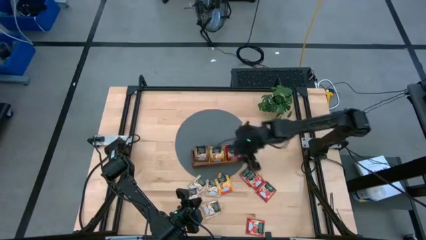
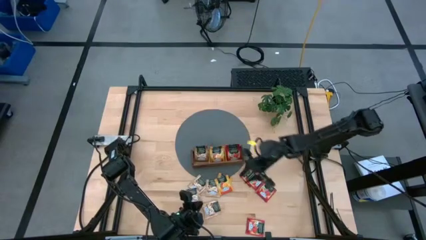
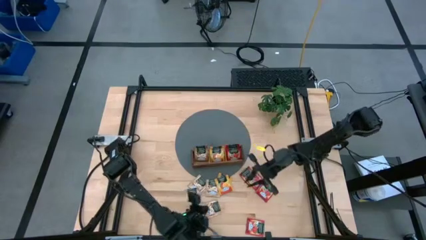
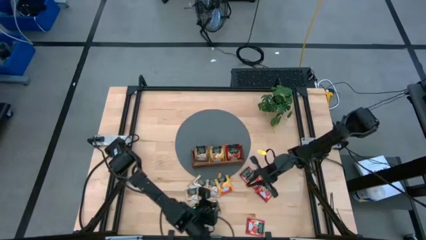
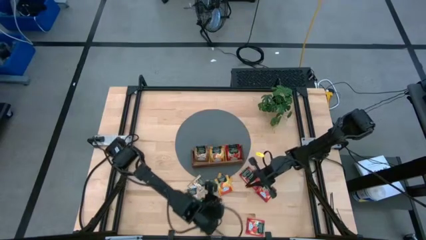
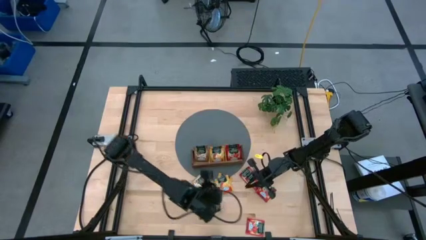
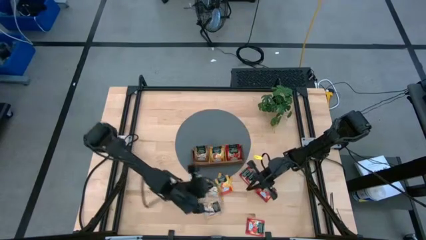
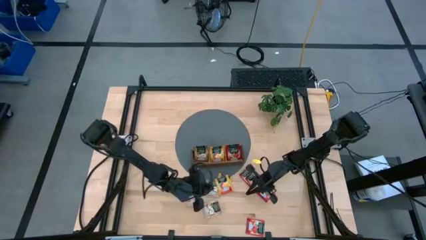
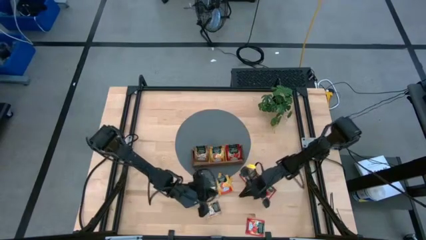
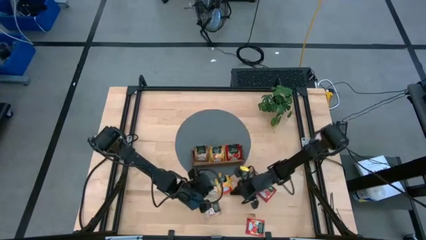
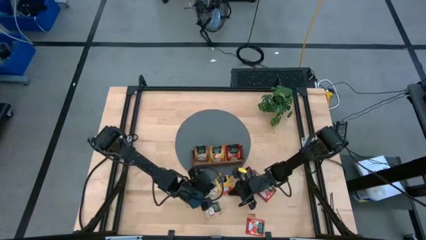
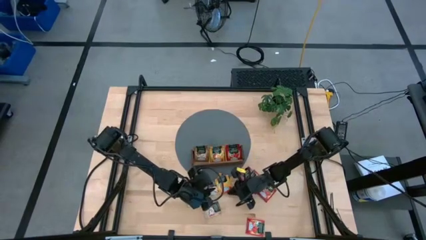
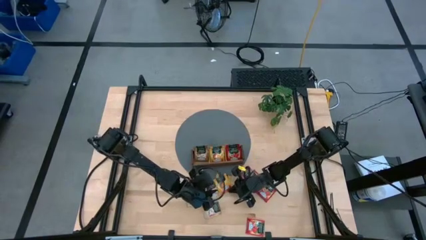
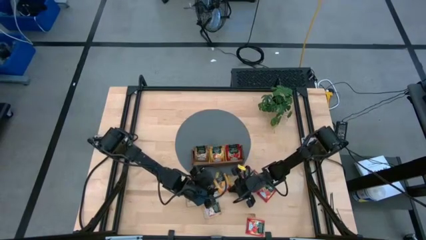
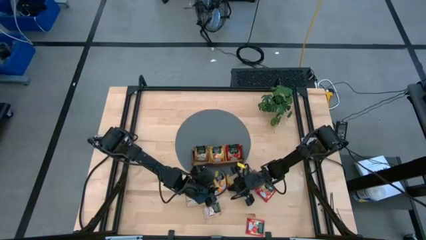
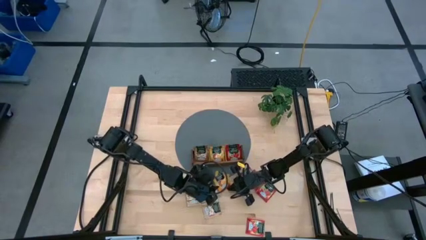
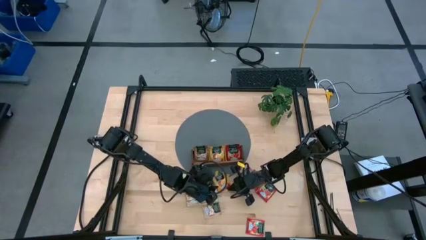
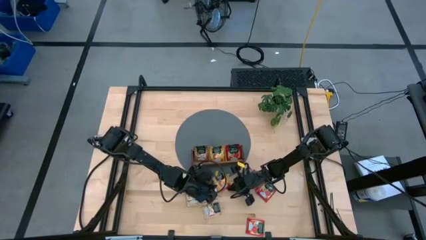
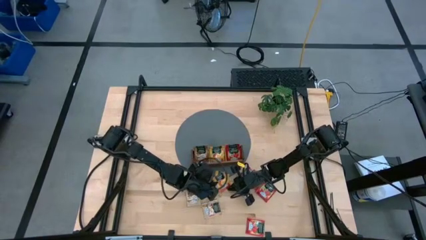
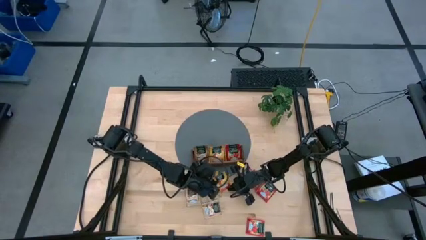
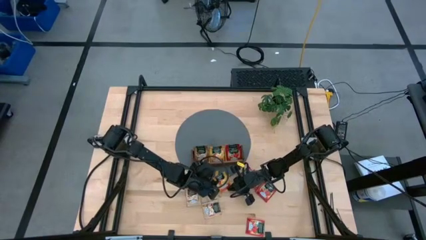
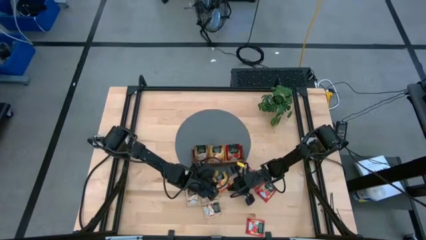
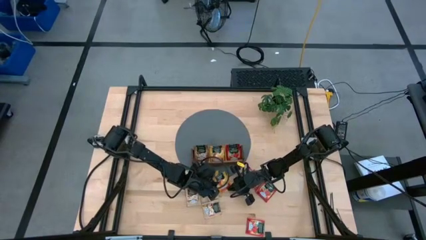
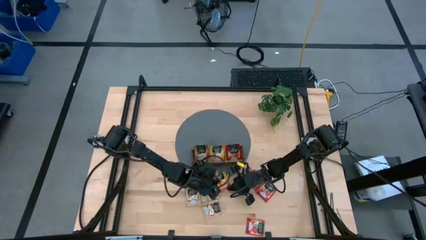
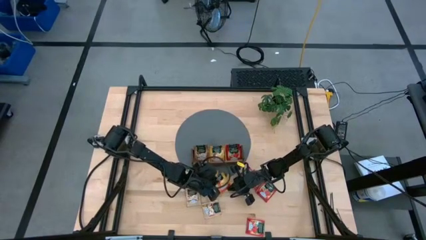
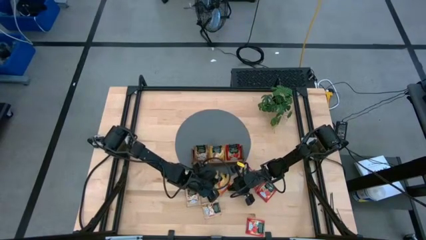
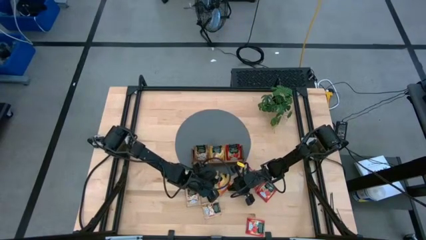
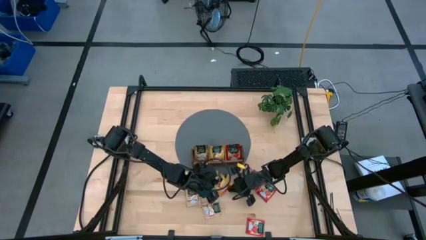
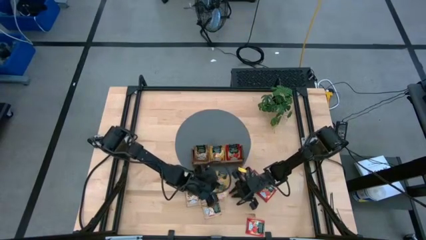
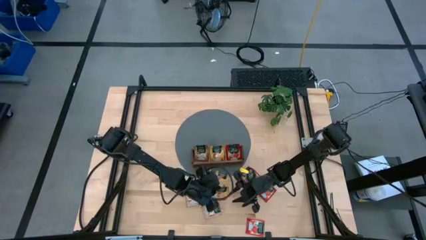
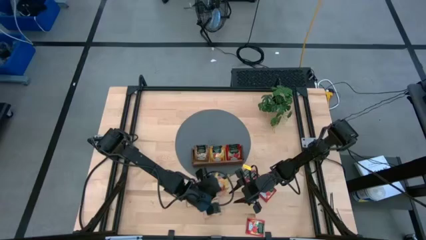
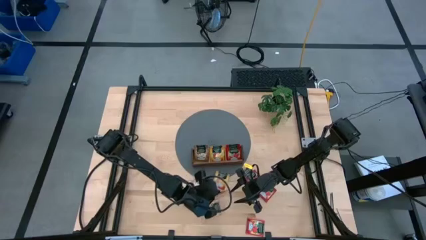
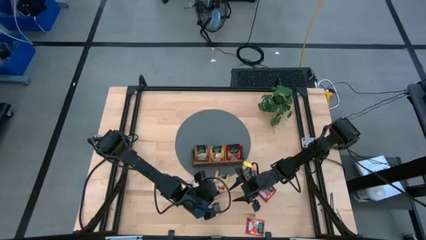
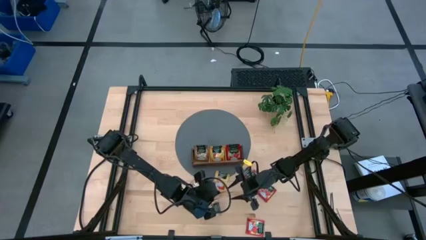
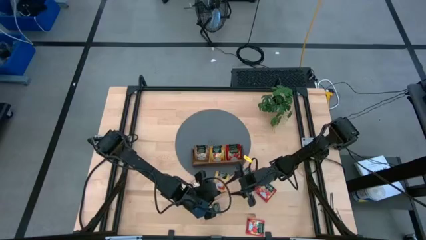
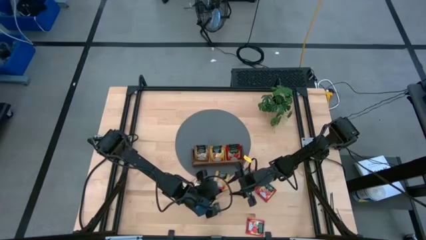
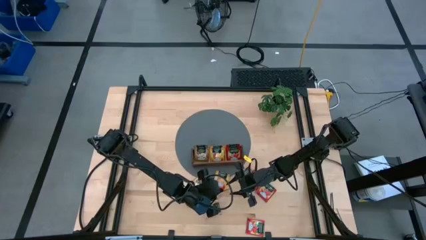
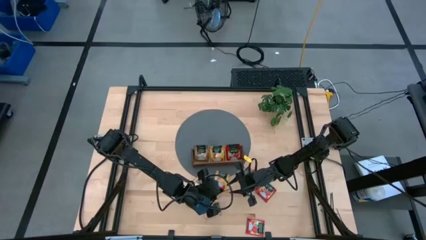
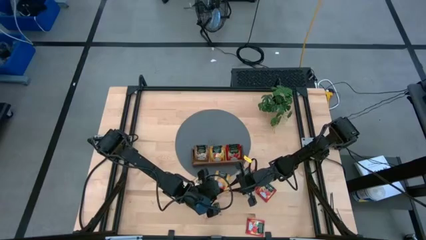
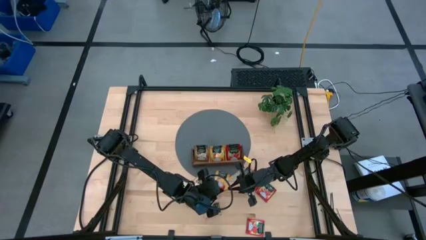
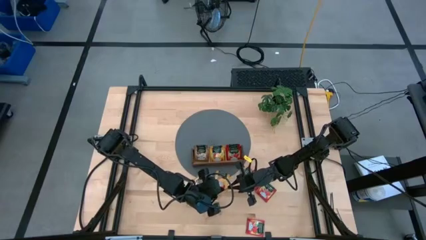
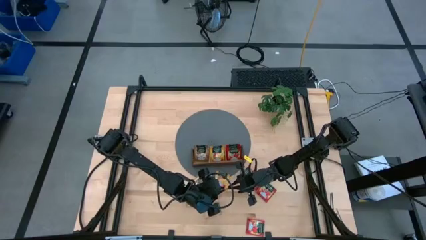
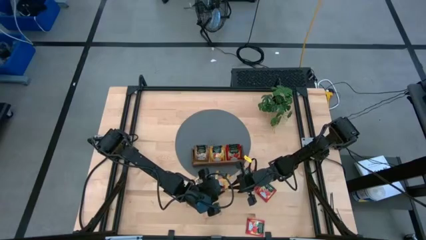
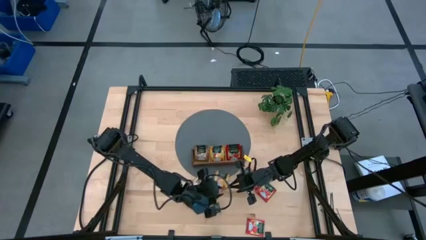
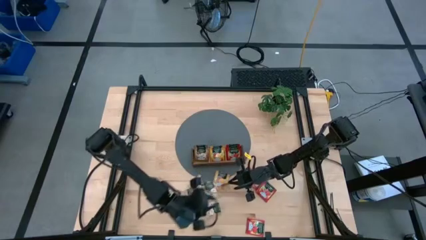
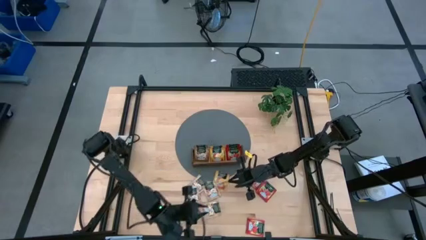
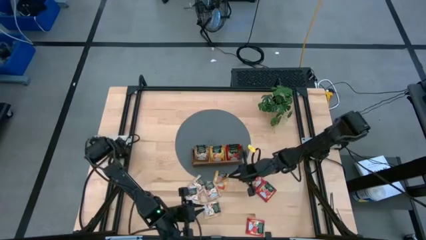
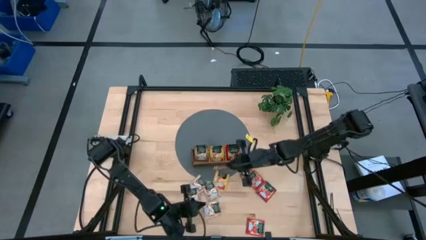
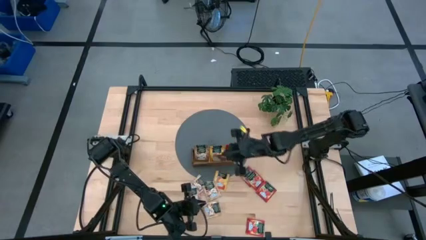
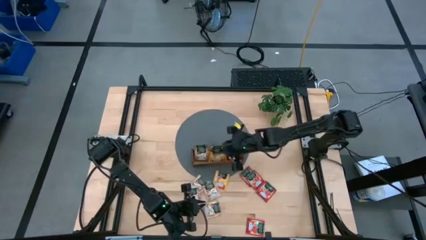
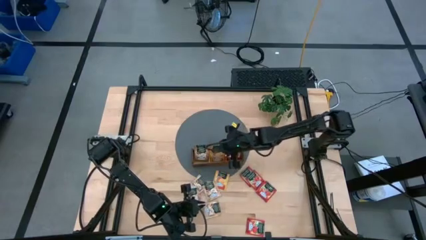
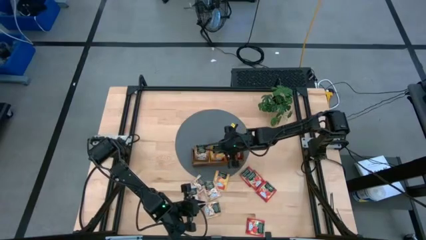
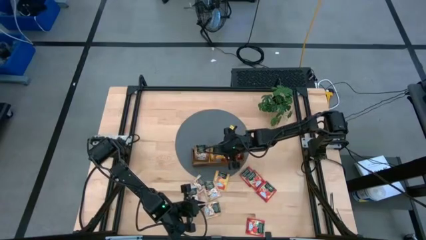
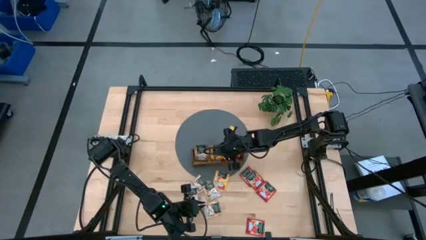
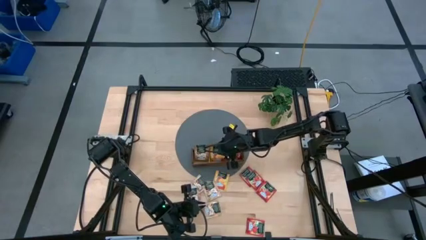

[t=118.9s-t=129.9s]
Task: Pick & Place Tea
Put the top yellow tea bag into the middle section of the wooden organizer

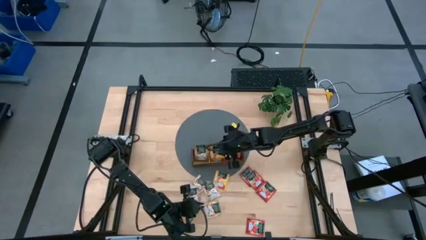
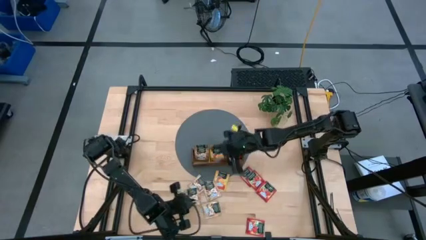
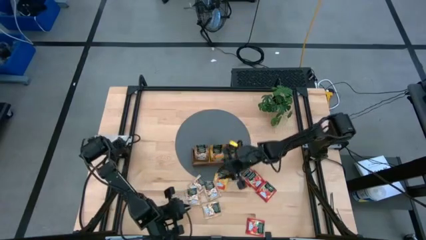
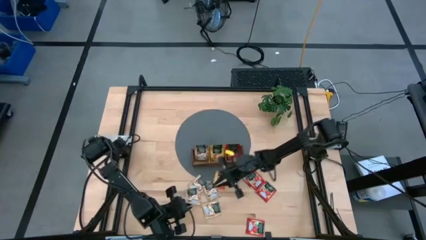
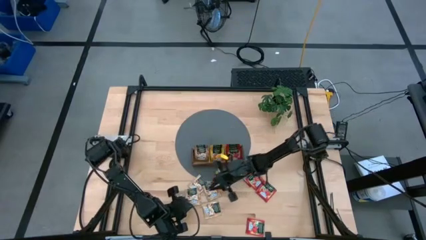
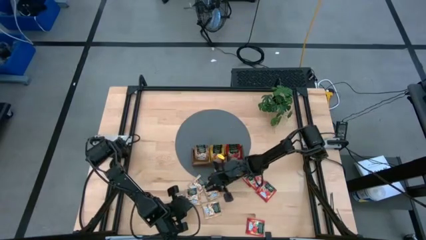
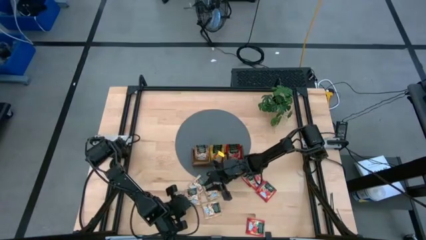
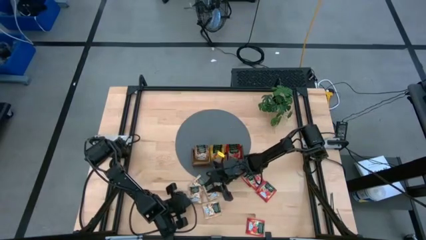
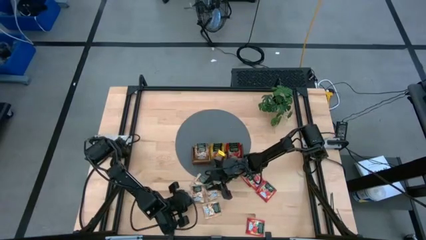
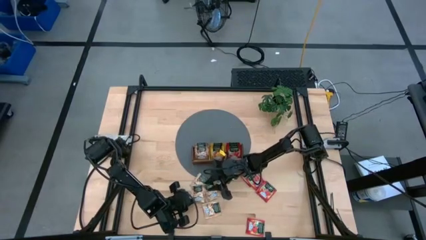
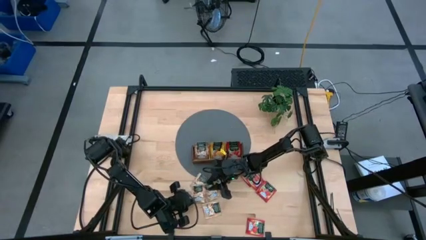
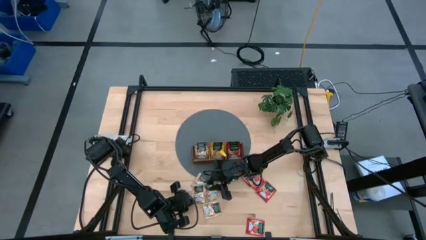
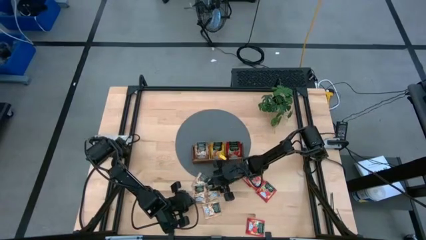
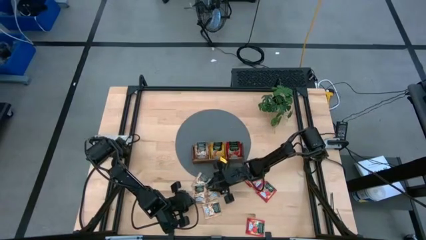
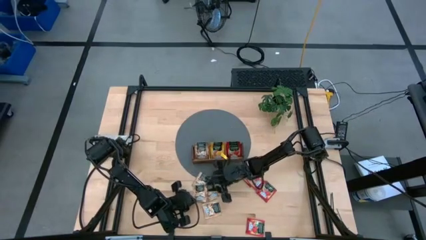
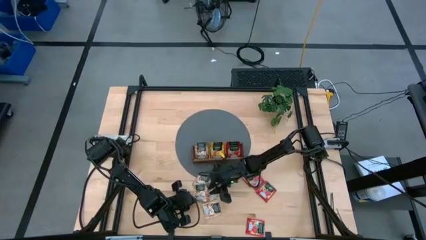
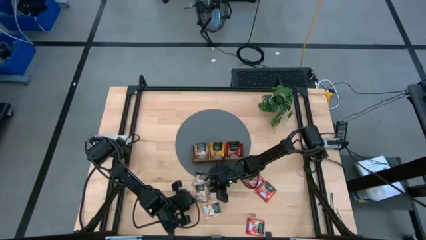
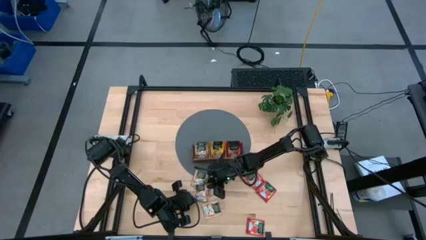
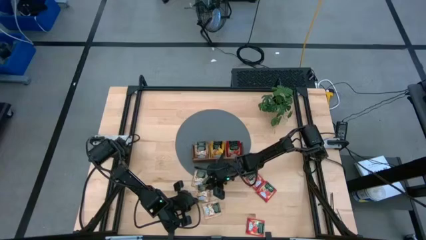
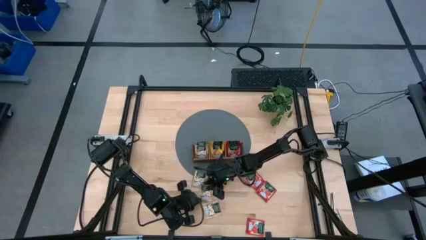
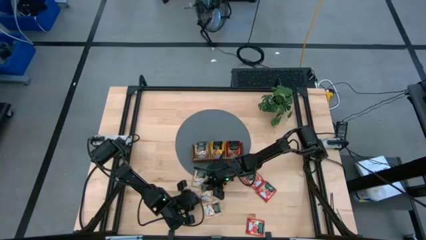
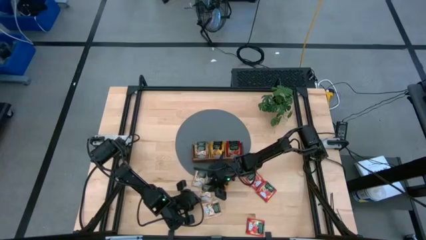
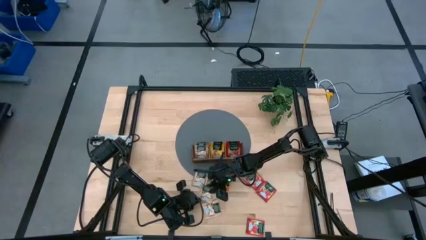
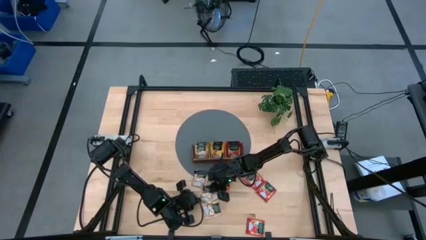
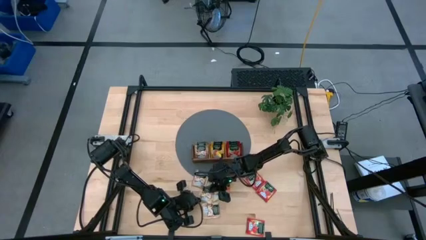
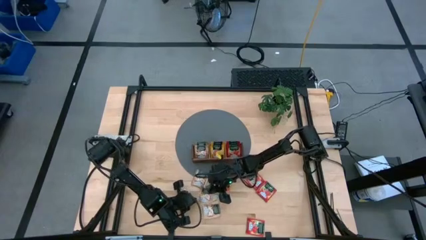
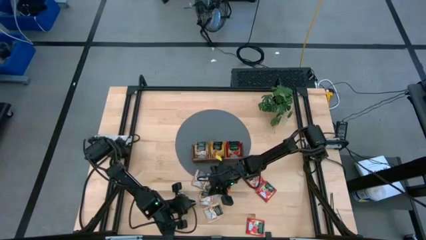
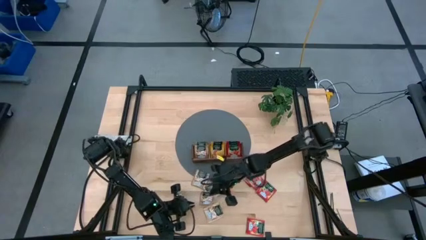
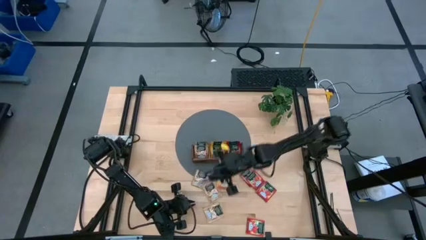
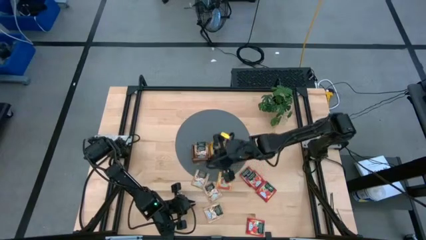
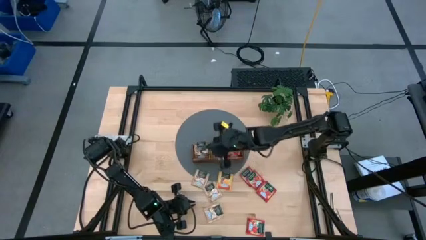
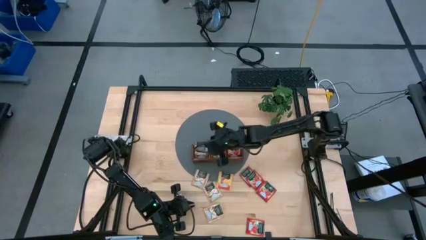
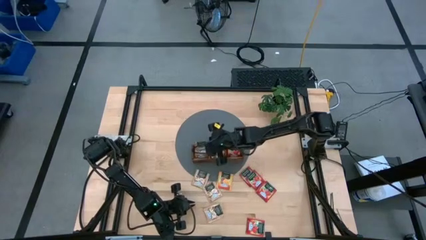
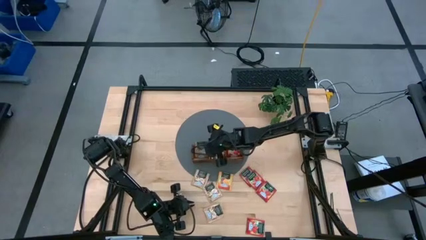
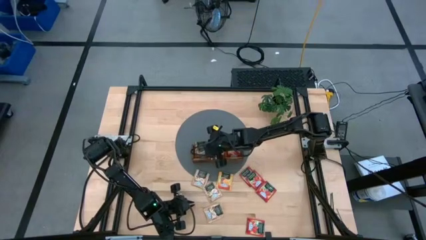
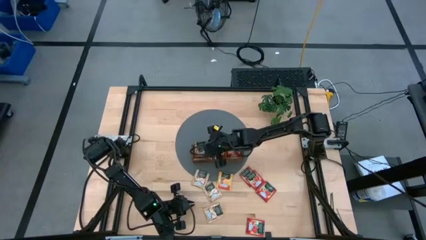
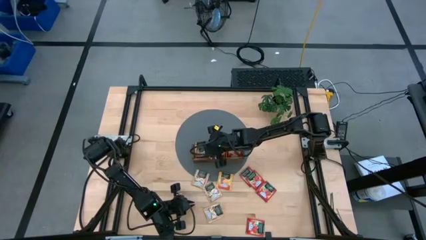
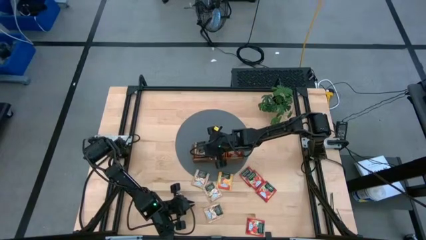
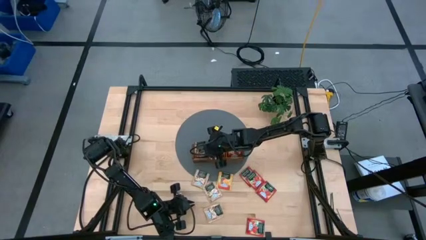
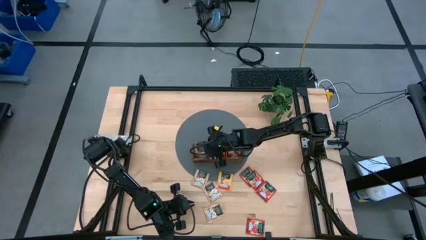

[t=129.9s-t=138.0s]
Put the brown tea bag into the left section of the wooden organizer
